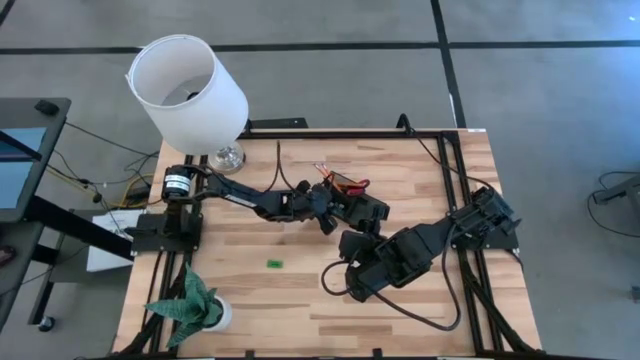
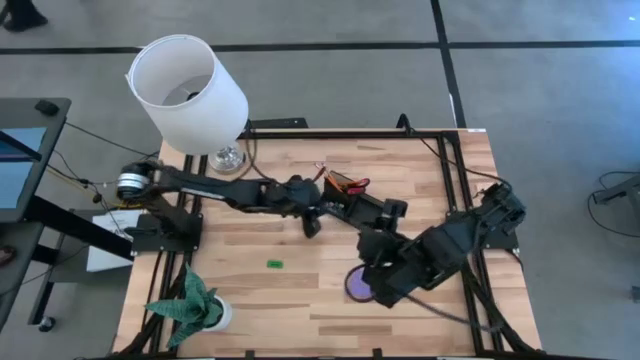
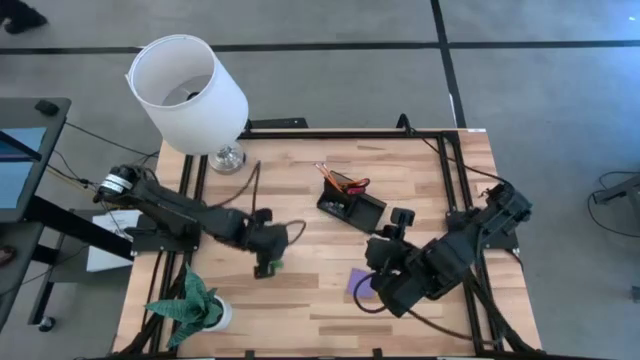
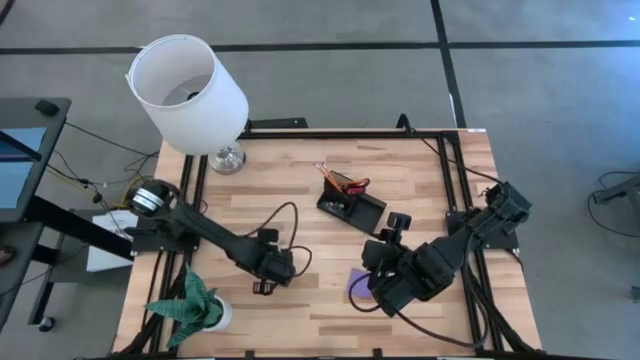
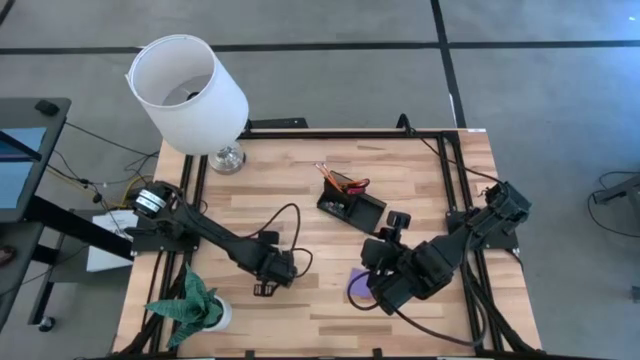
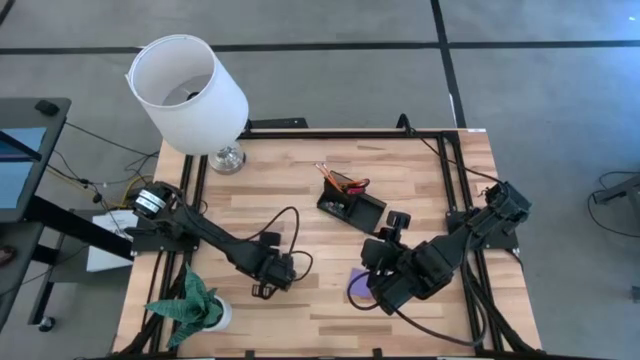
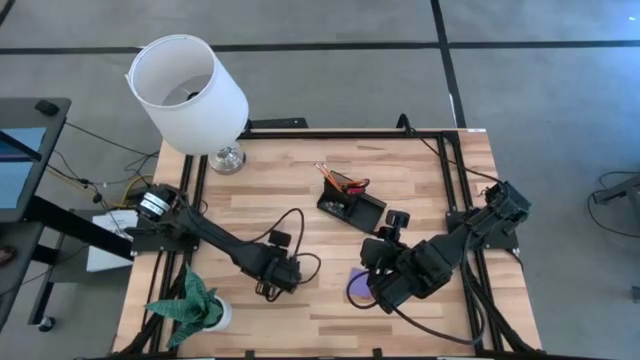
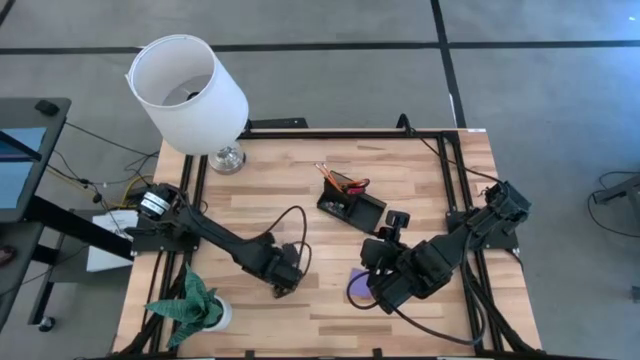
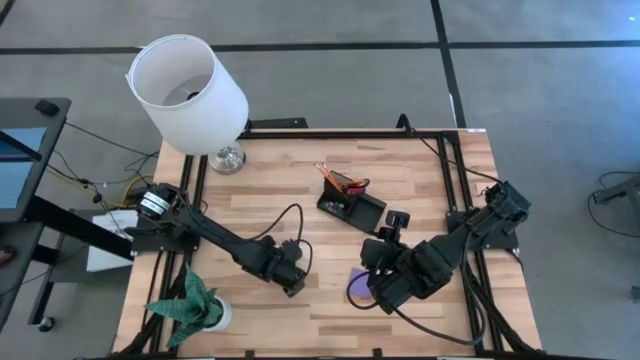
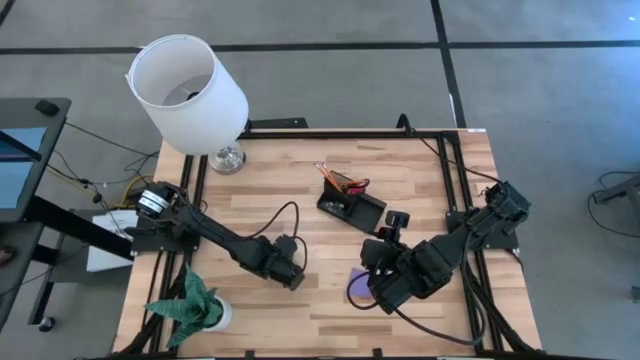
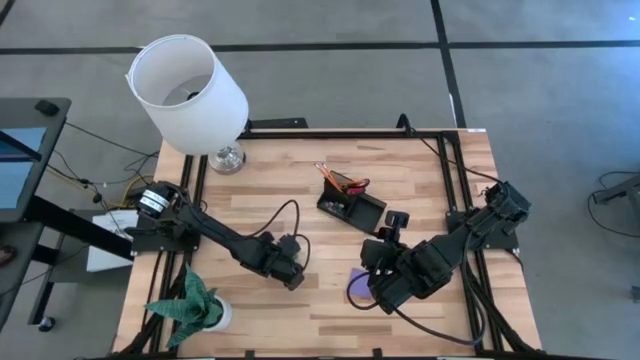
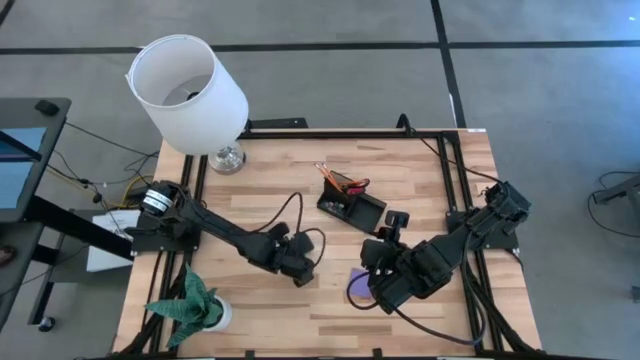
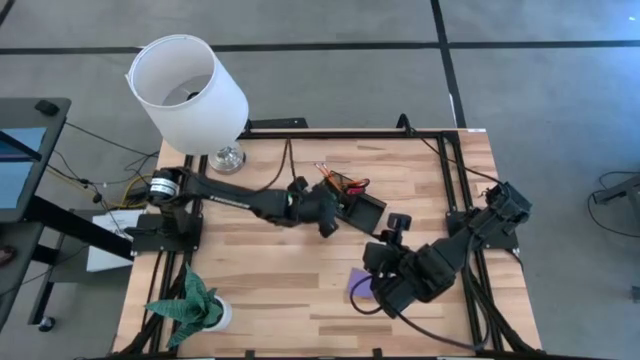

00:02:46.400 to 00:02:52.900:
Task: Pick and place office supplies into organizer
Put the green eraser into the black desk organizer

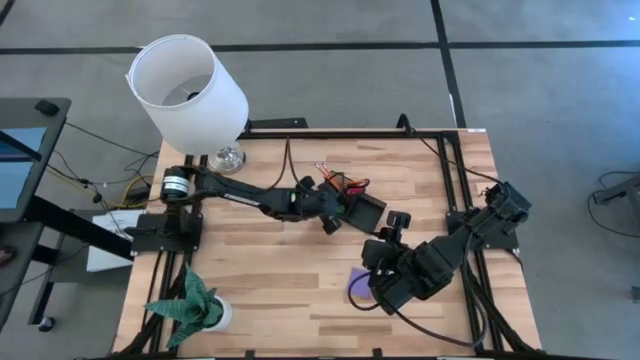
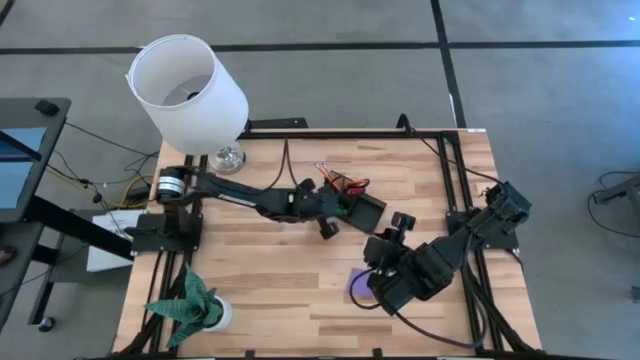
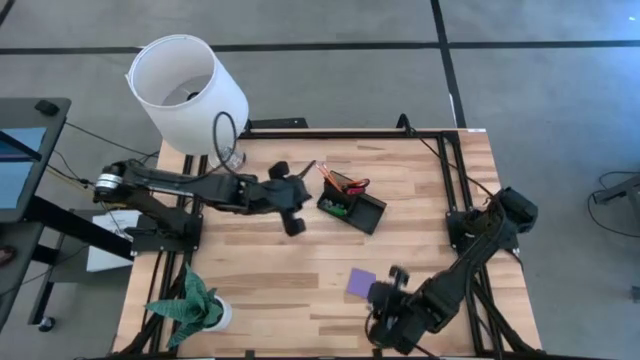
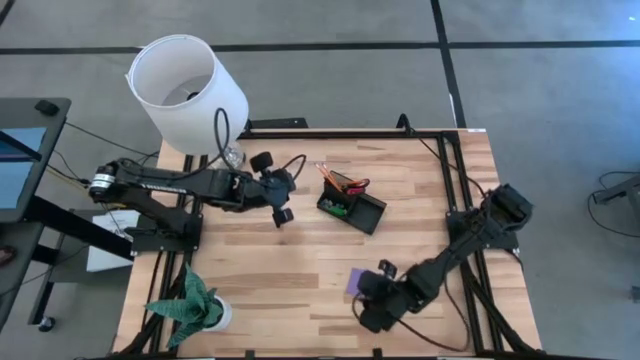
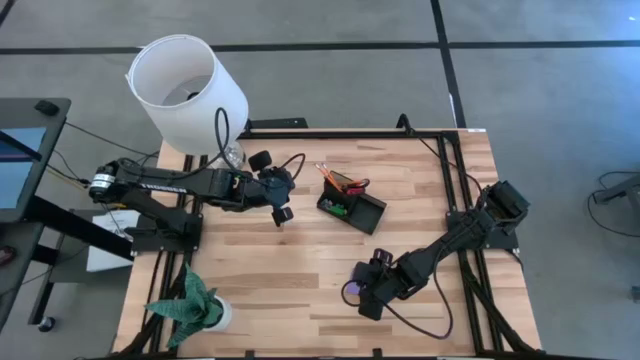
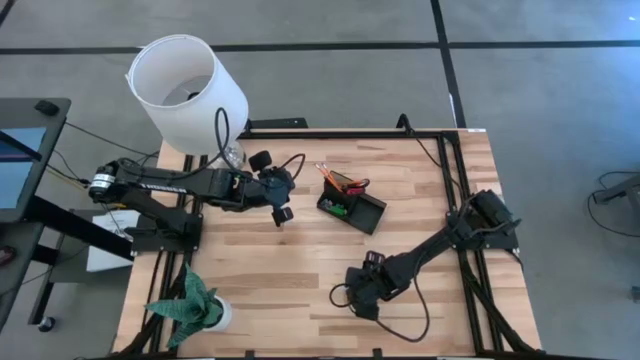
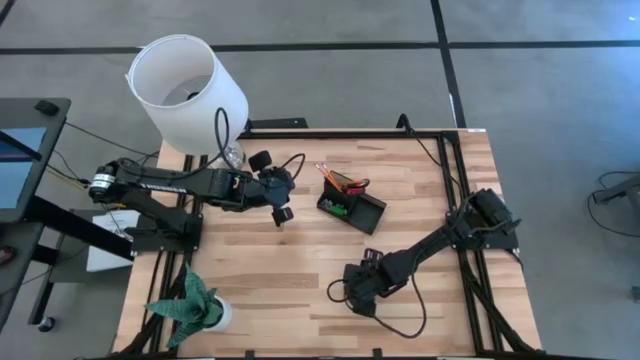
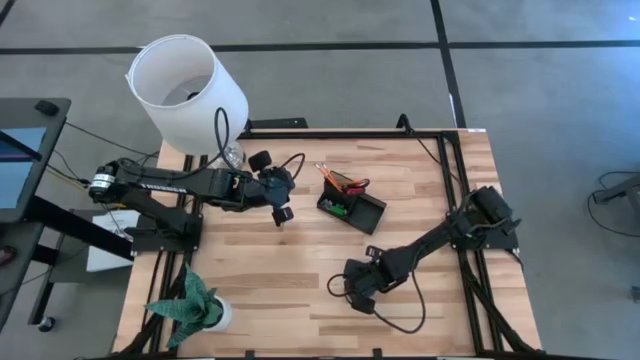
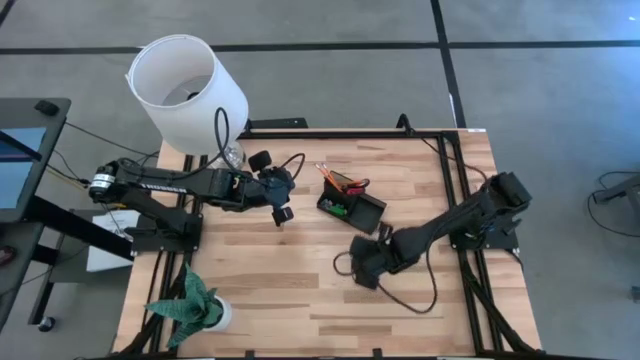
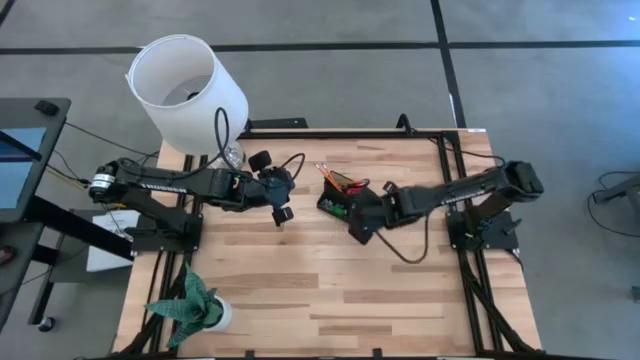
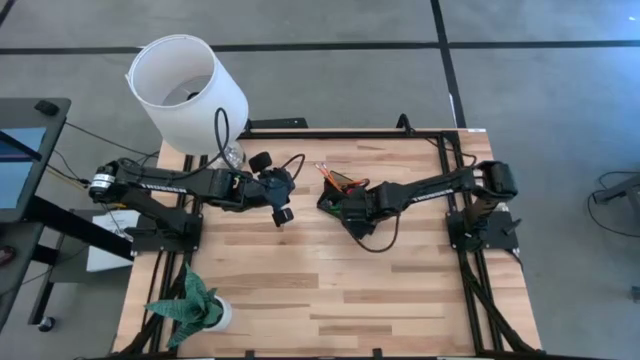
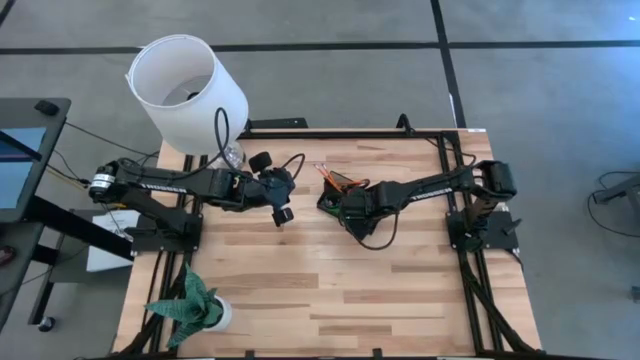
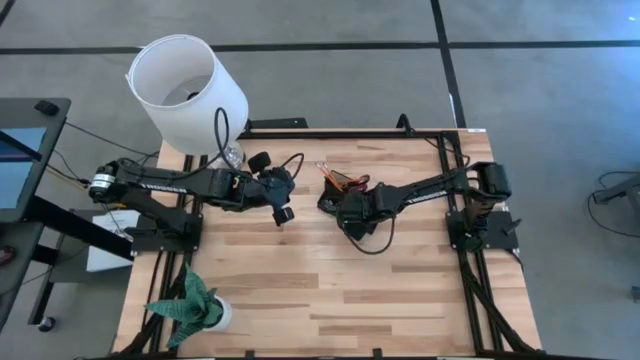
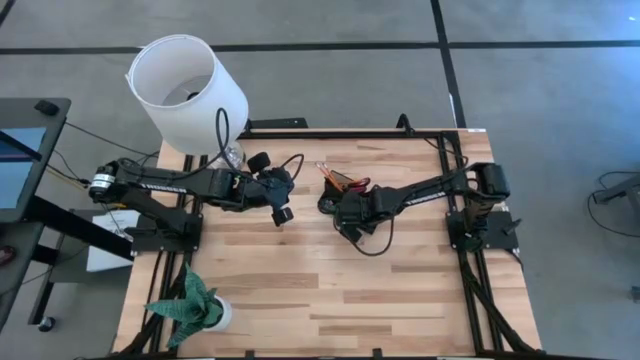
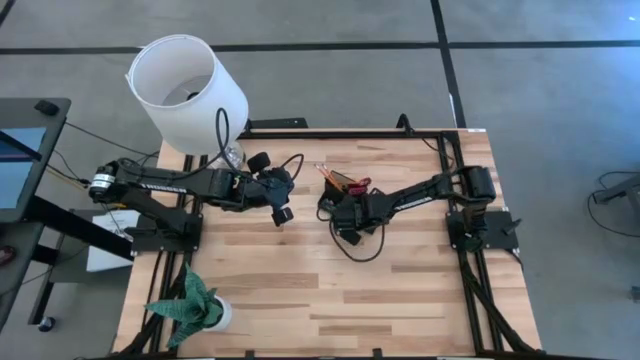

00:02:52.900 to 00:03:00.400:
Put the violet sticky notes into the black desk organizer

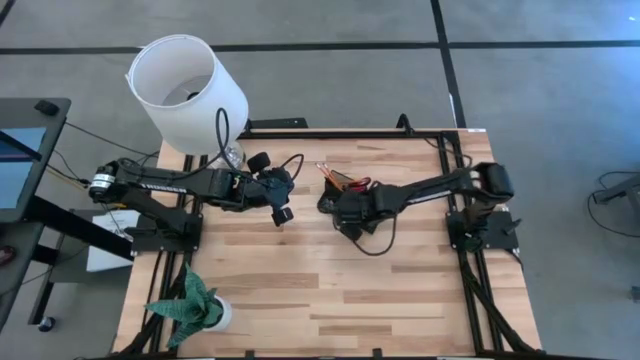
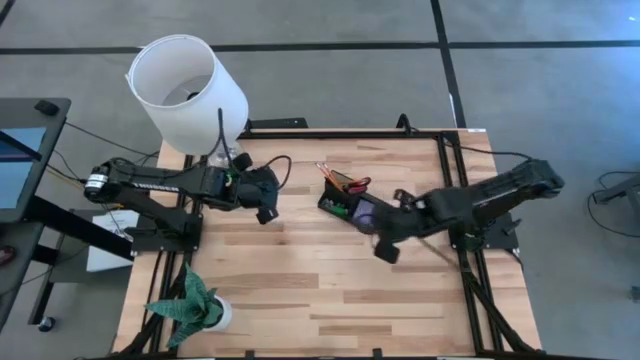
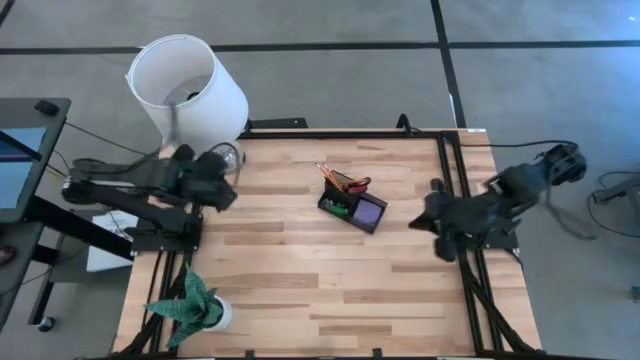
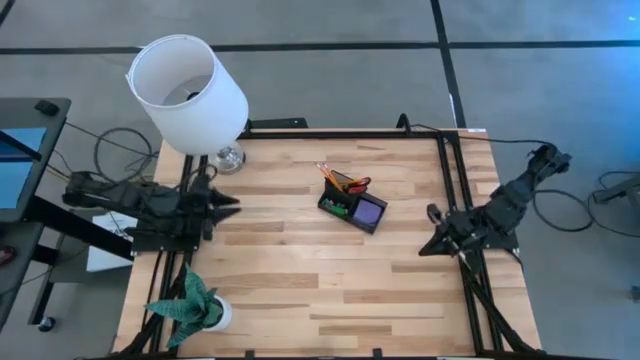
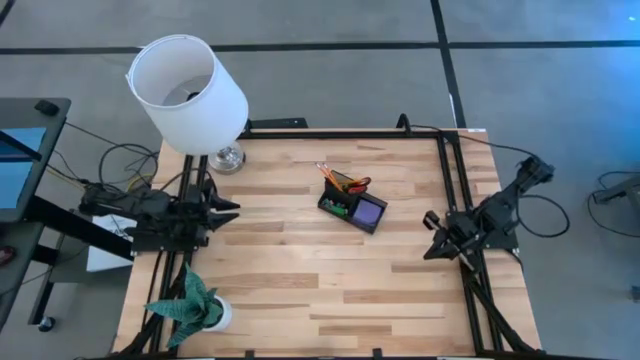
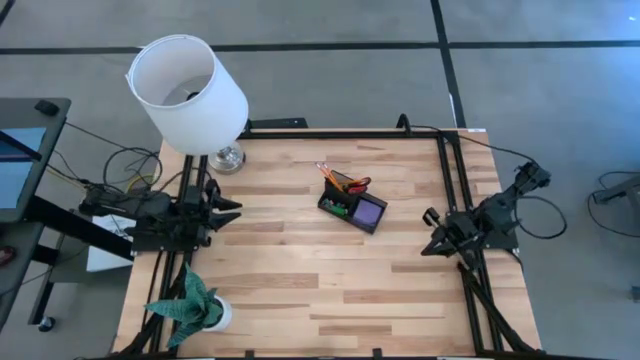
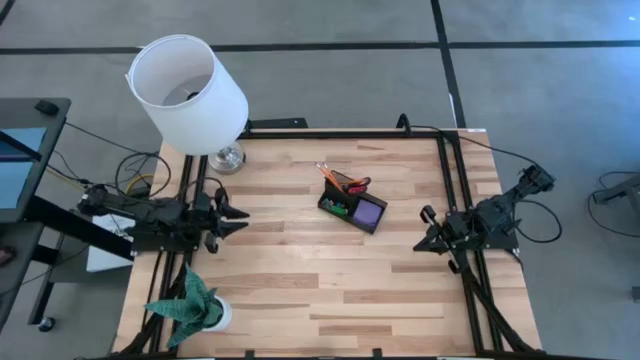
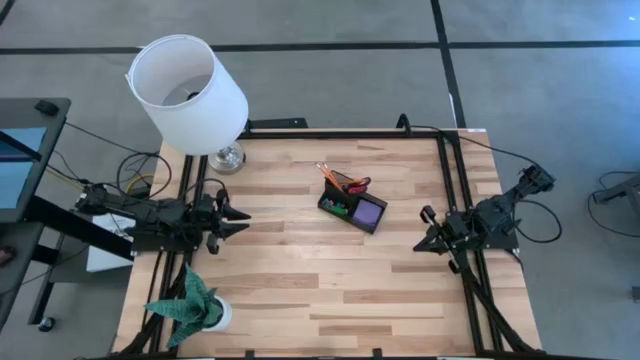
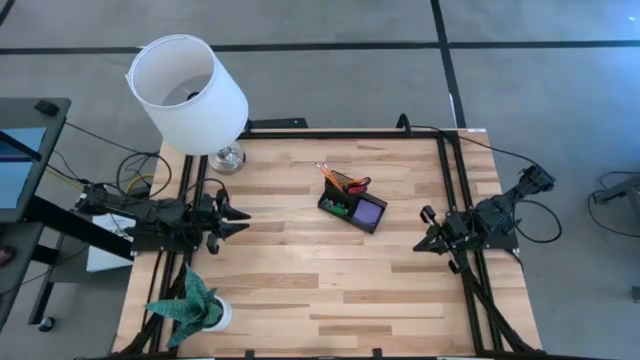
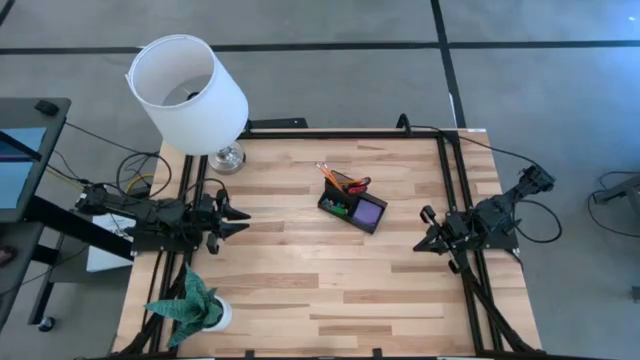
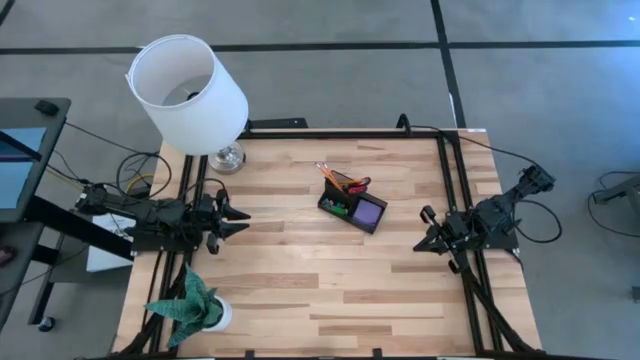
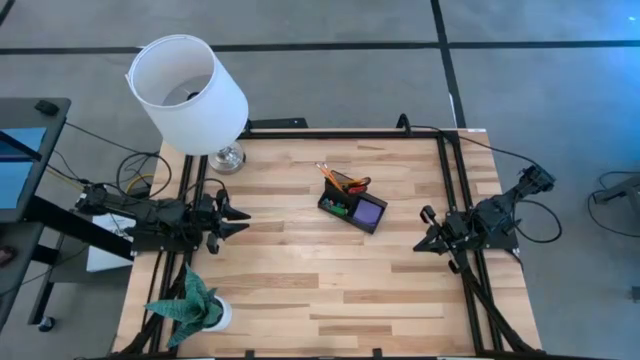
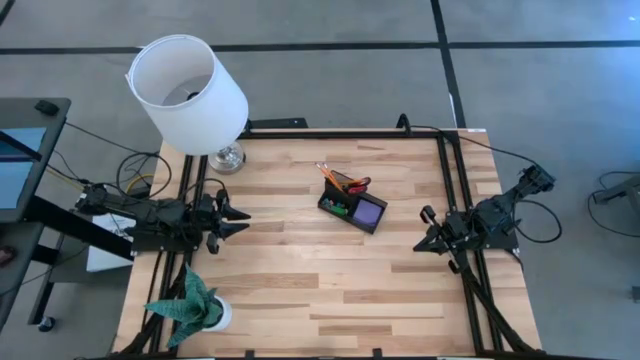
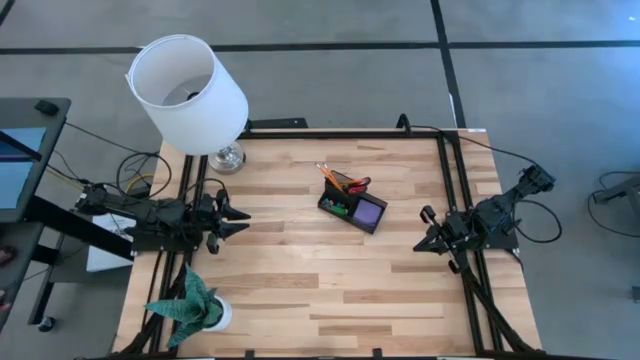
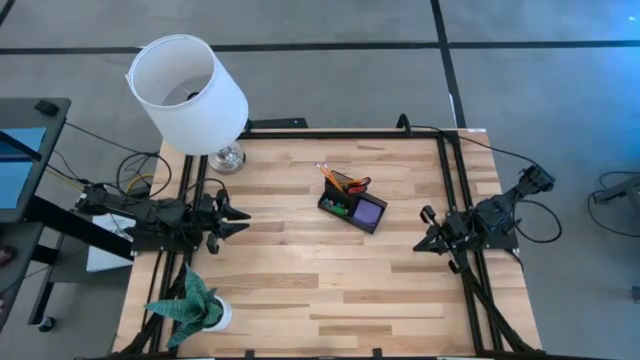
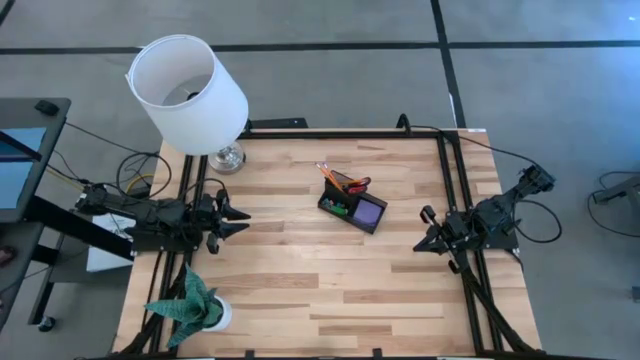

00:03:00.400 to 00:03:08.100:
Return to Home Position
